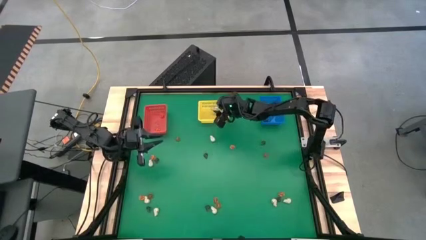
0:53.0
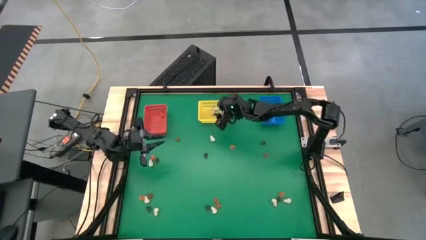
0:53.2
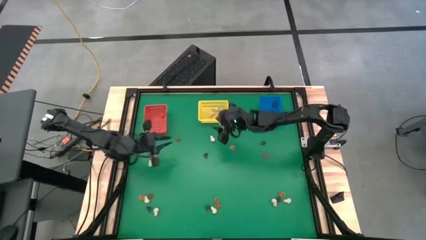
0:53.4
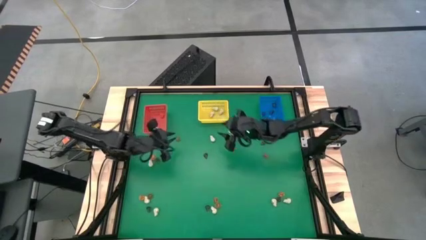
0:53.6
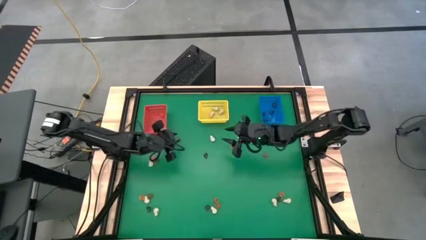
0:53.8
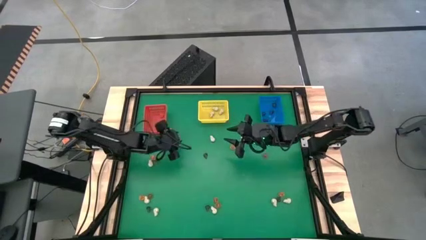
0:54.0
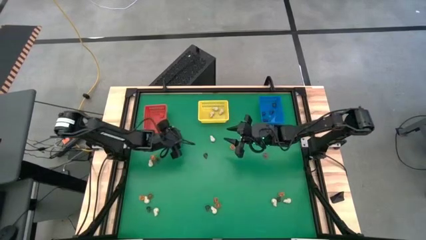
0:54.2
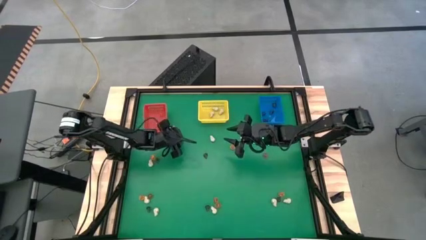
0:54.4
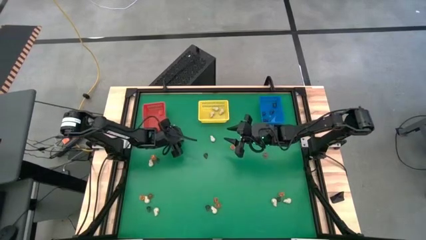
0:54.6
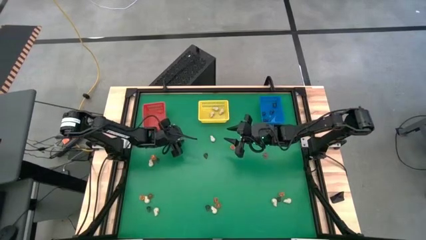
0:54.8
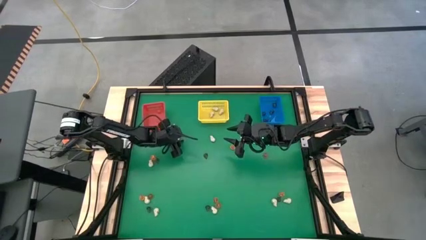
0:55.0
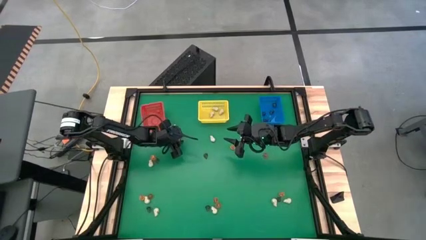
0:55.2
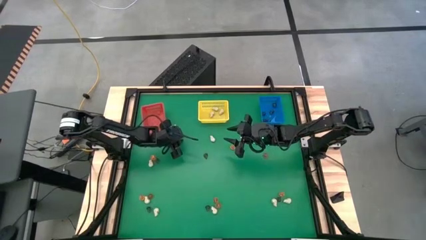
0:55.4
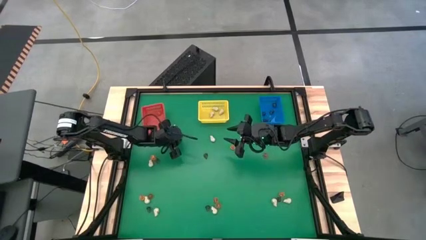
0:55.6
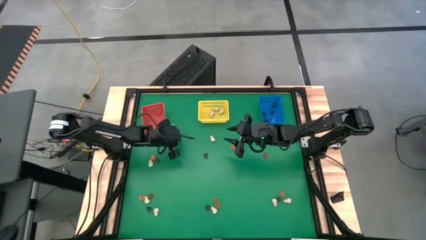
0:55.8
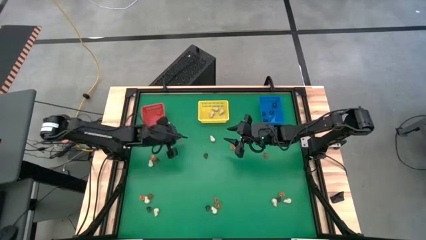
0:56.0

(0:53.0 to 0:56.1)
Task: Sort Halloween decoration
Put the orange flower toy into the red bin

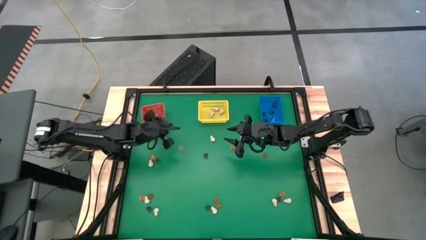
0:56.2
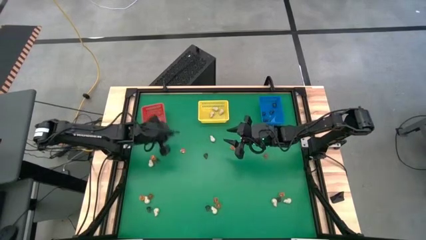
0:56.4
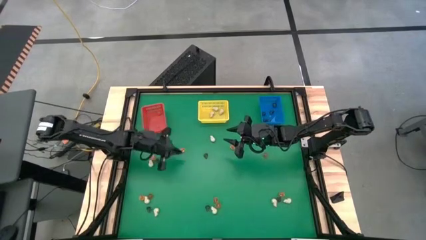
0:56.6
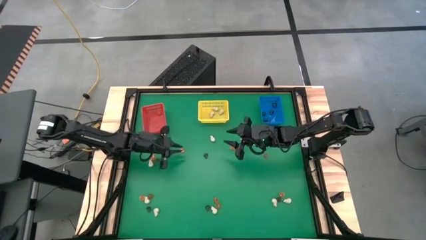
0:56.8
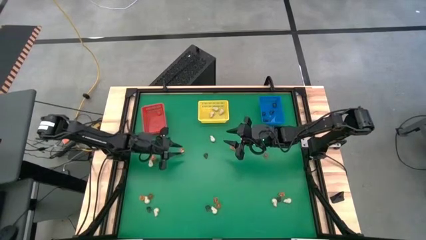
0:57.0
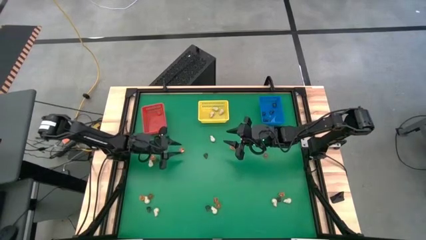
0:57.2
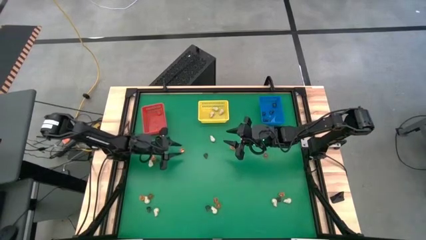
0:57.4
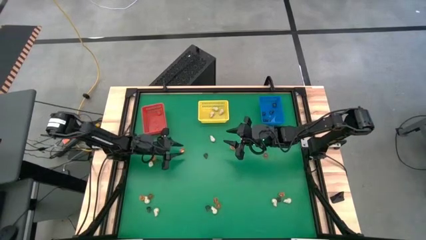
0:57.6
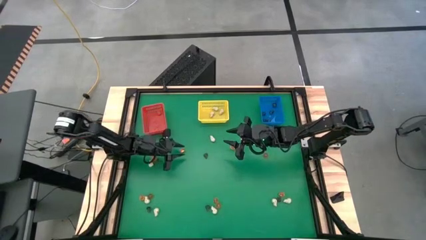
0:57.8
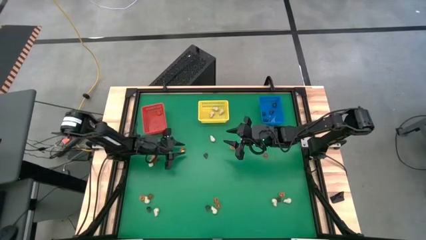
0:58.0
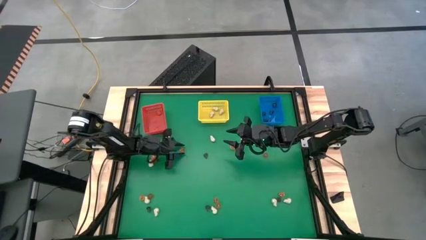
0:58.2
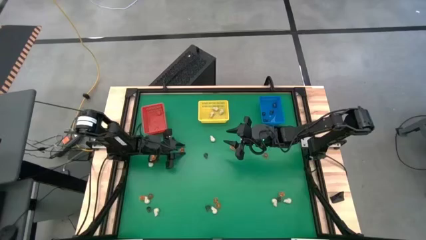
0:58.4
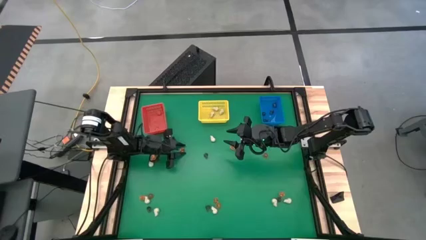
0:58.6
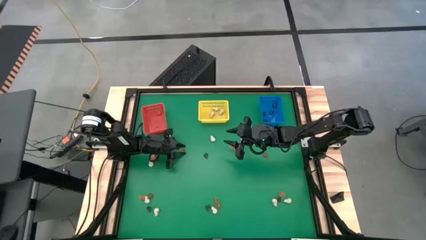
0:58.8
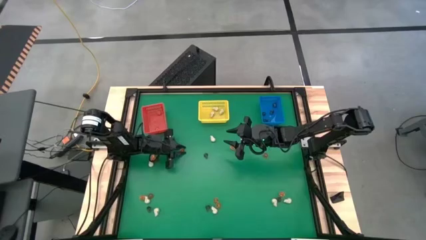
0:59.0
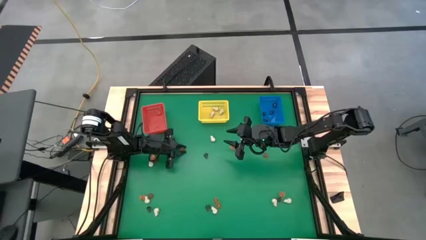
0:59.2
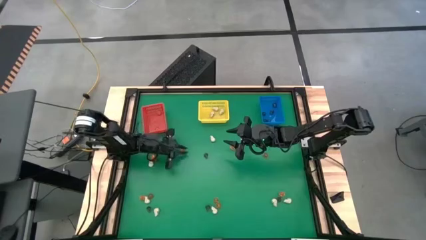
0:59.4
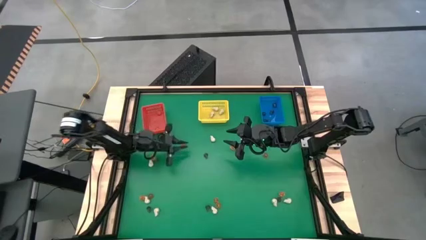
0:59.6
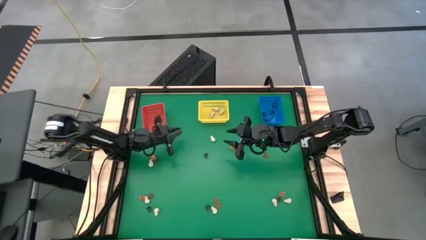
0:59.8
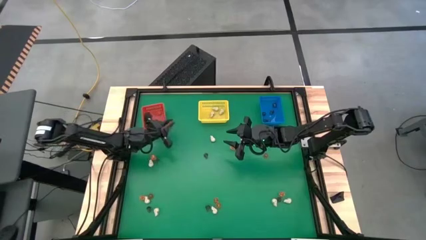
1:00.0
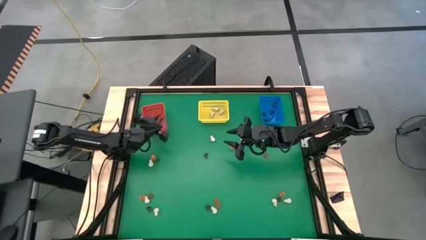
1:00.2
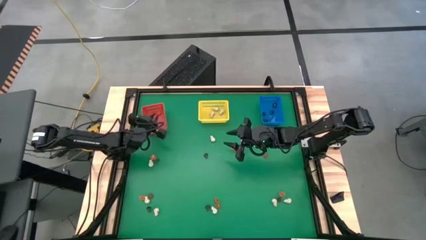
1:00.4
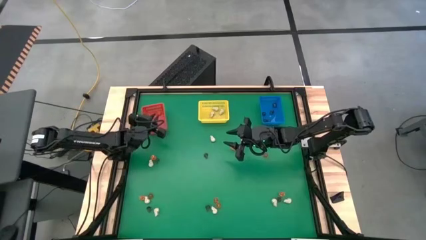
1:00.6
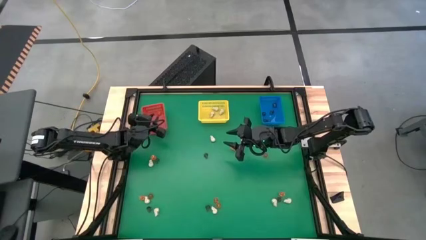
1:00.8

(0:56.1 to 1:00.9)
Put the orange flower toy into the red bin

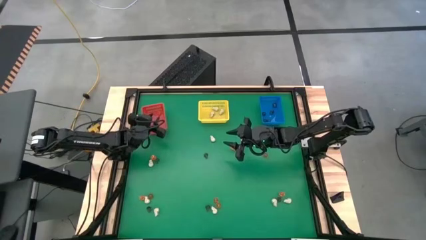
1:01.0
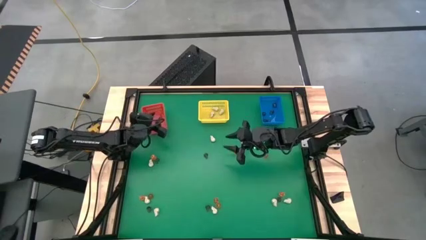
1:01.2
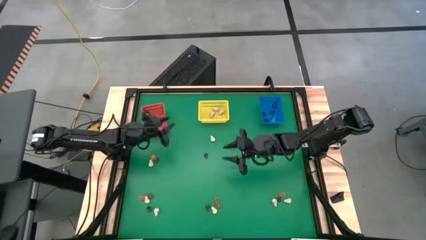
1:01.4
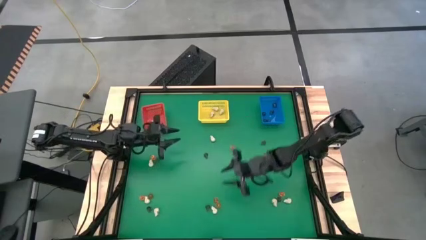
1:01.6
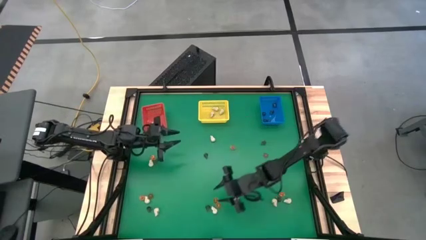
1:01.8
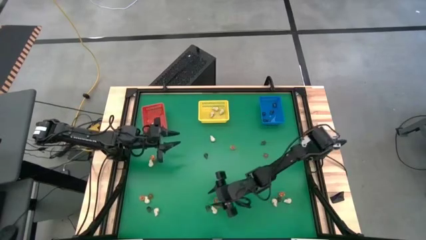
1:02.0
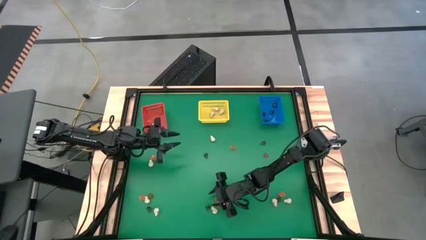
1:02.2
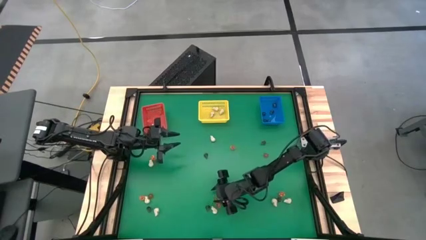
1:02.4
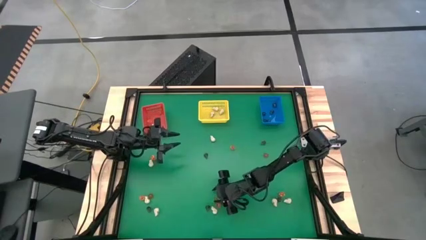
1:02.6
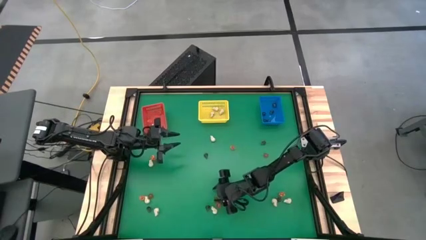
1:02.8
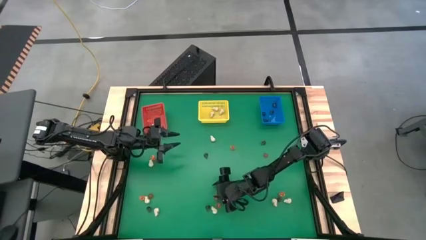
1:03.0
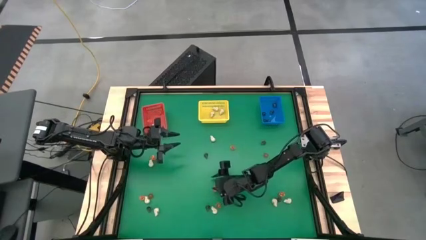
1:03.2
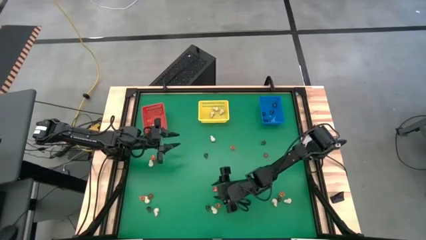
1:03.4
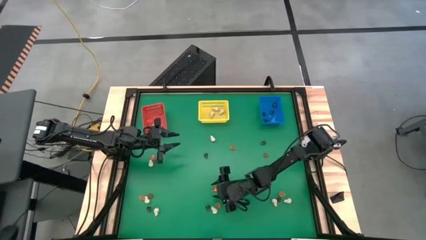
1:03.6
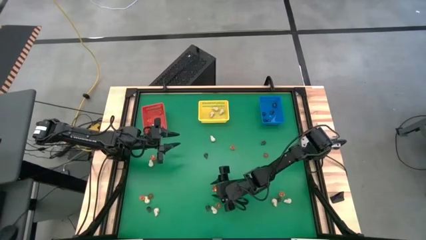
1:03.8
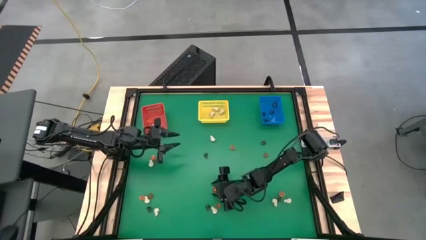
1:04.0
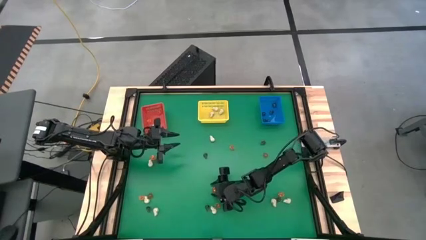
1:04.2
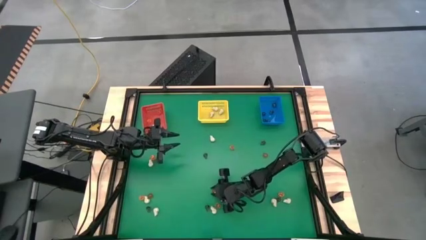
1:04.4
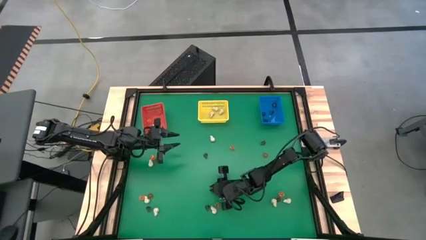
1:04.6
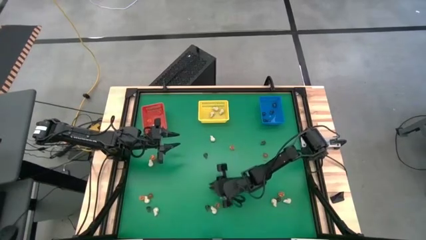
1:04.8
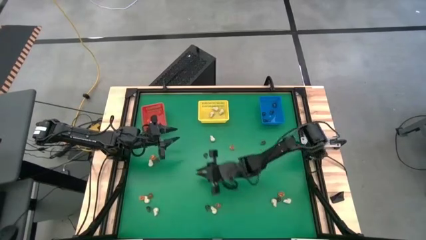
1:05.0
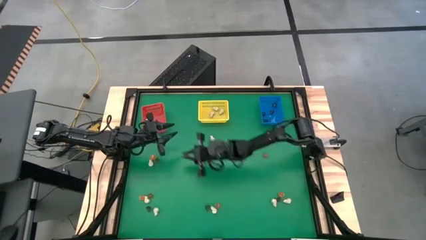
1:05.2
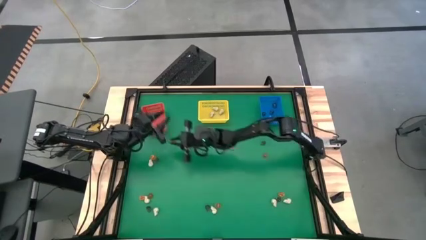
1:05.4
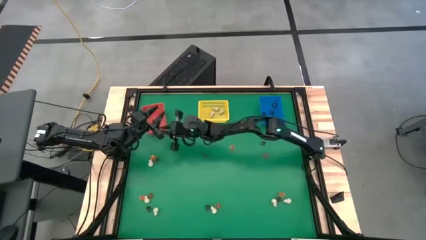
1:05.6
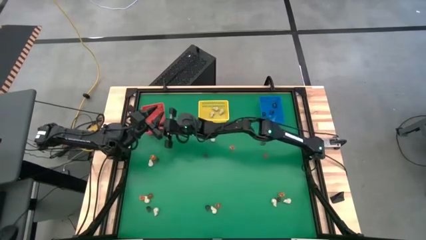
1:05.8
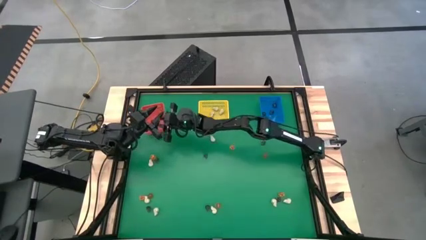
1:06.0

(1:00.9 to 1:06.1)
Put the orange flower toy into the red bin

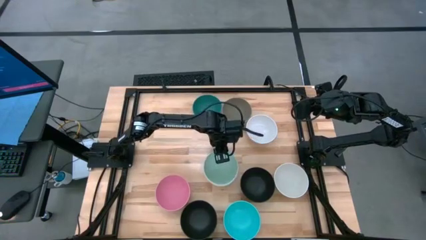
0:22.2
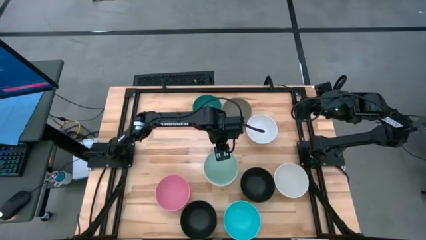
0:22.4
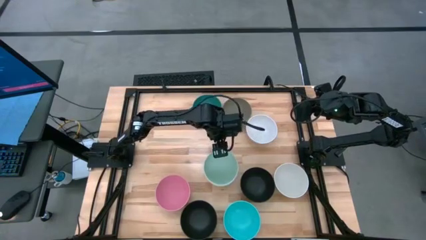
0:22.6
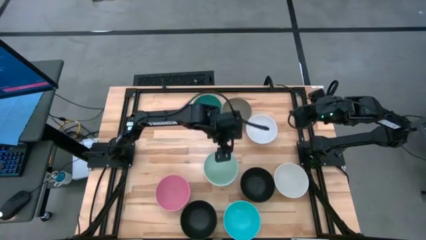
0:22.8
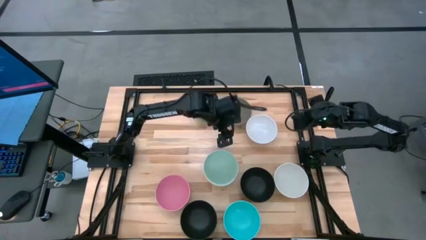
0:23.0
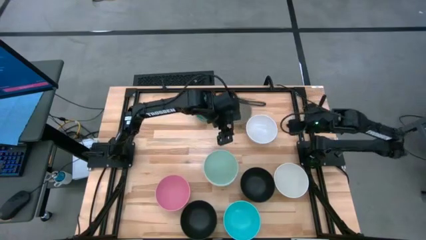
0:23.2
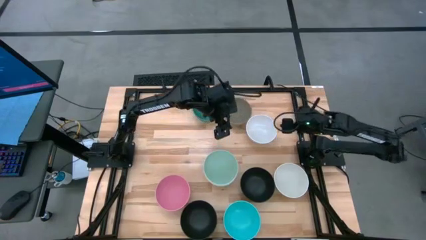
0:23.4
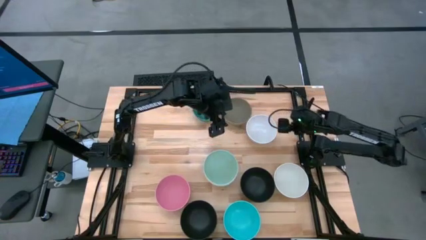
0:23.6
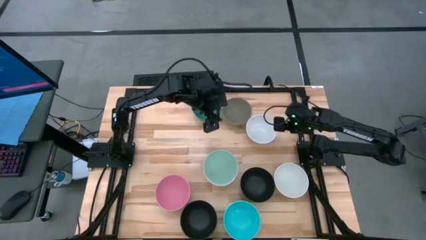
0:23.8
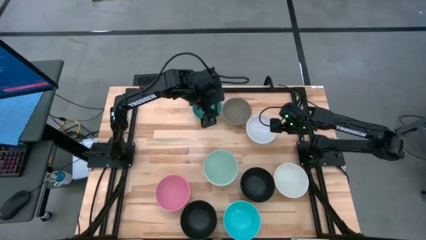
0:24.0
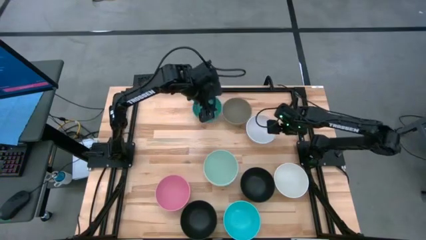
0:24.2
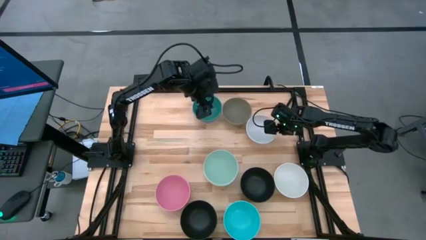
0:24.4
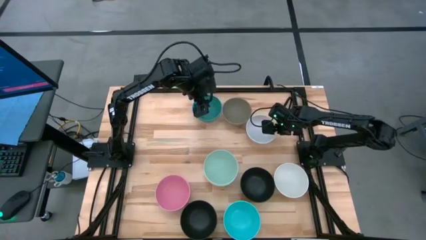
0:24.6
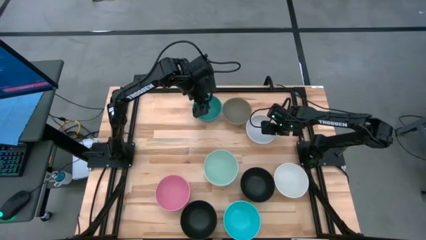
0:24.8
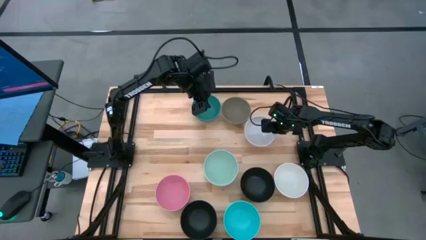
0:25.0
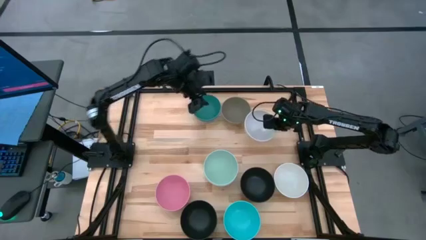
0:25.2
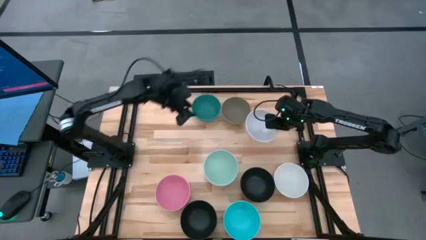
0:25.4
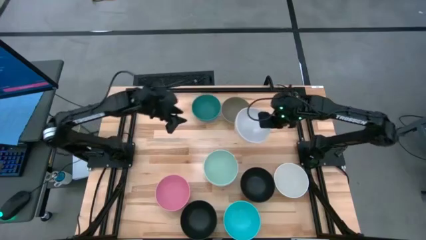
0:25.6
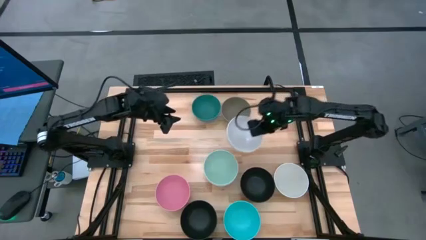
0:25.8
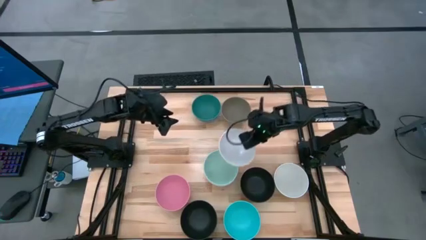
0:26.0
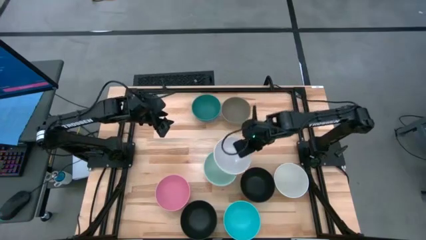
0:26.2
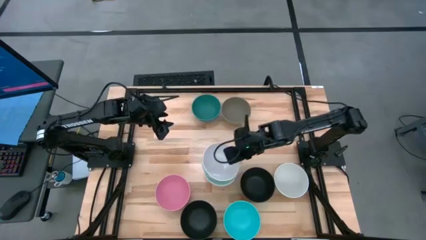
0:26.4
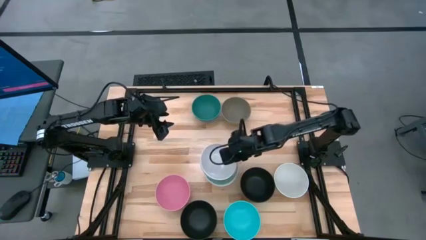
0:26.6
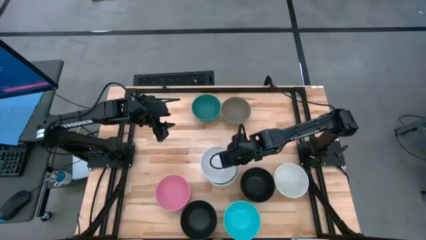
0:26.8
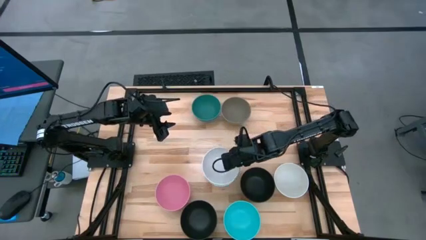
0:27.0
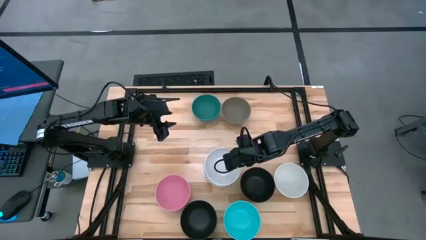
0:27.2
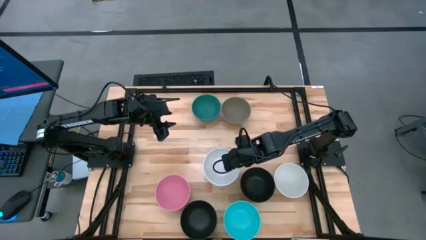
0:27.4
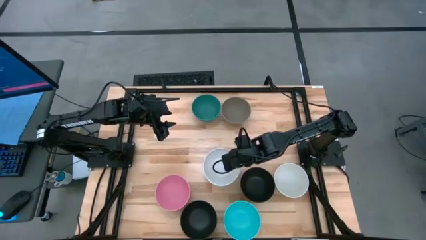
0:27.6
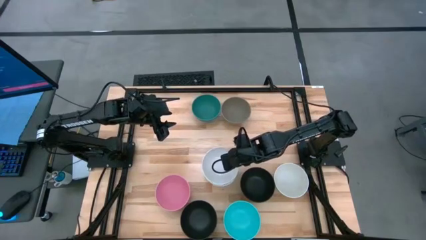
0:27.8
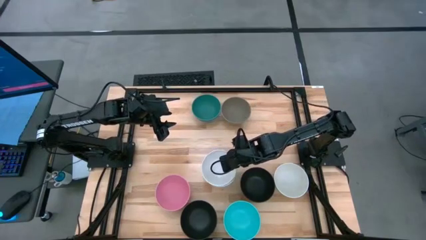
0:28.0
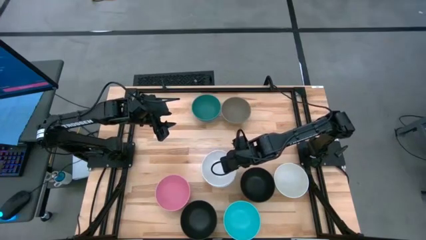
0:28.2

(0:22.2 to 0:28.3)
Task: Nest bowls inside each other
Stack the top white bowl on the top of the light green bowl
